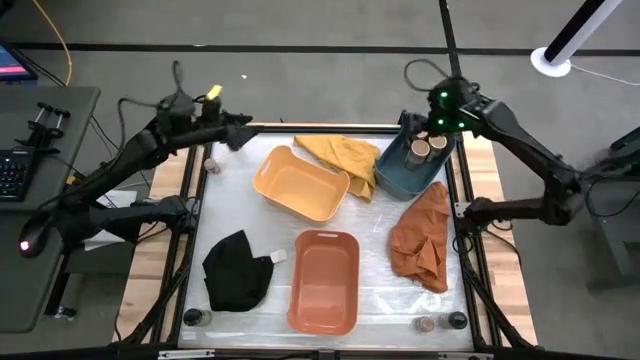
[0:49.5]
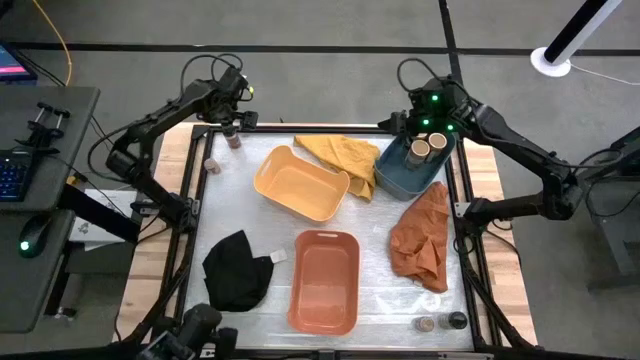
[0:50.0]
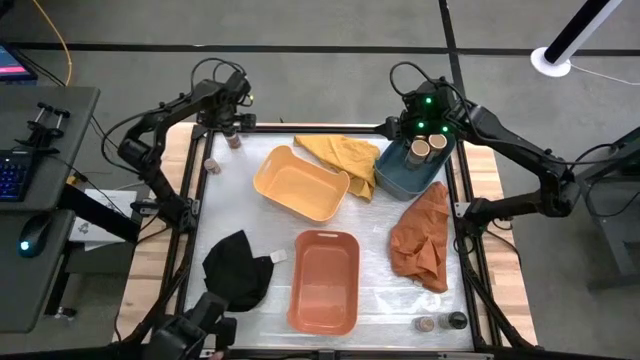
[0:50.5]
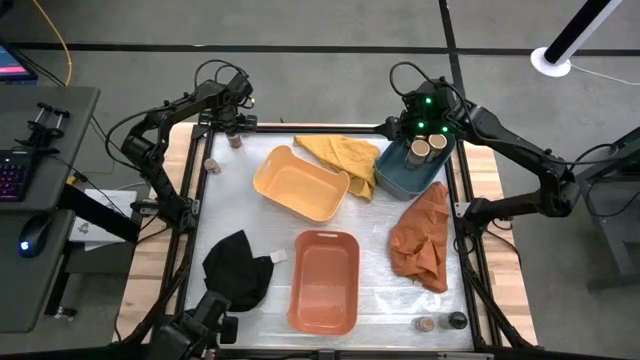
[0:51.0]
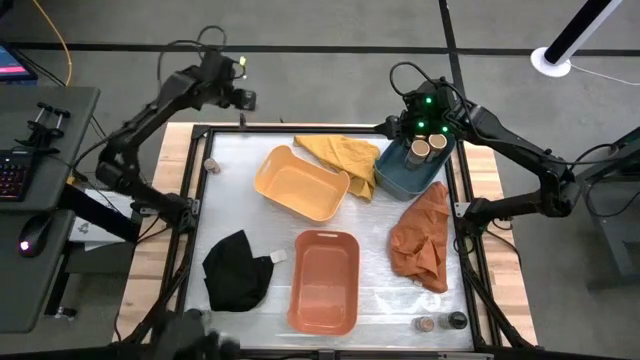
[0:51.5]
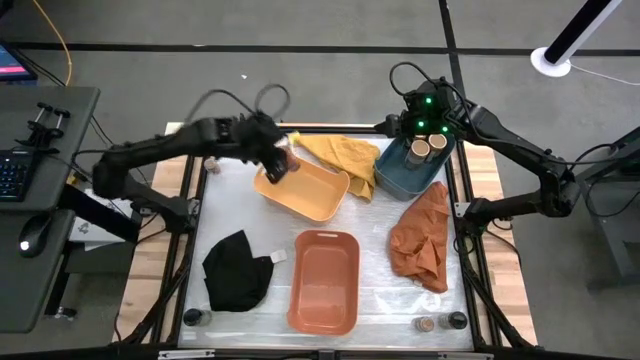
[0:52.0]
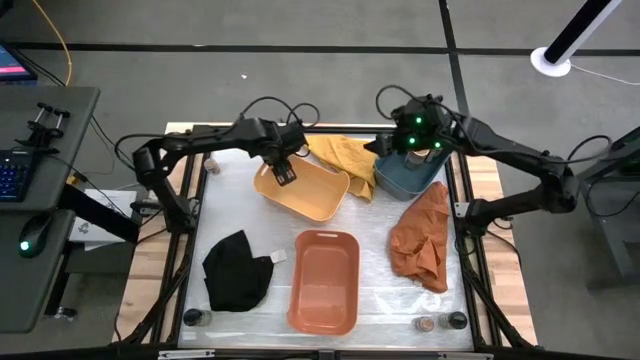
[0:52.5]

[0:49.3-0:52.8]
Task: Sort spices by type
Put the orange seasoning bottle into the yellow bin

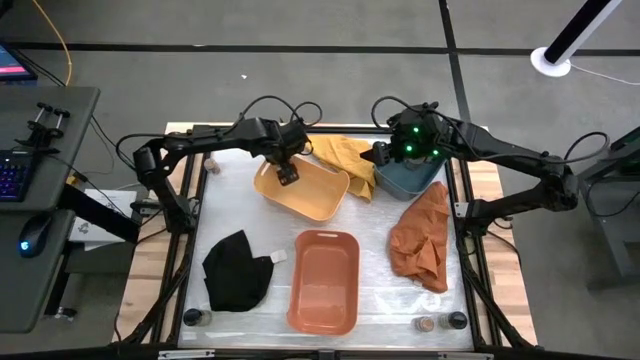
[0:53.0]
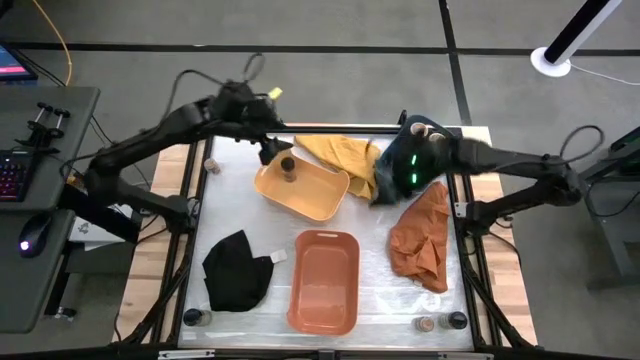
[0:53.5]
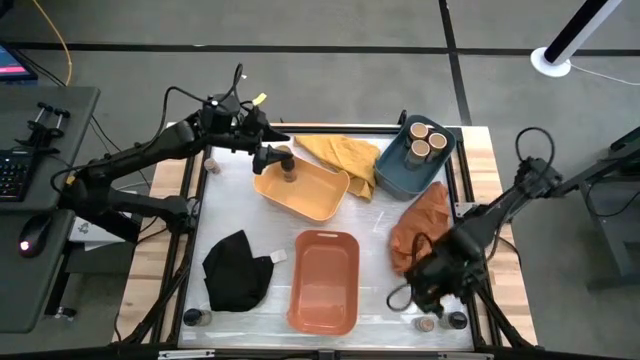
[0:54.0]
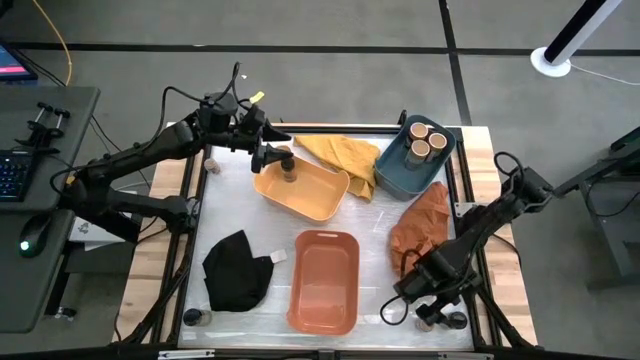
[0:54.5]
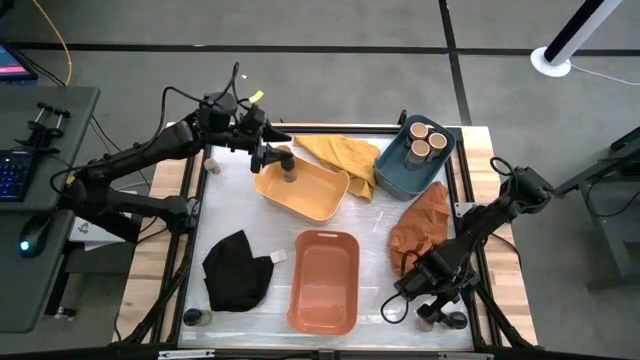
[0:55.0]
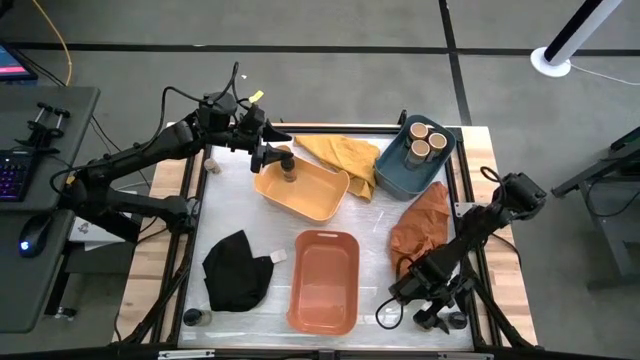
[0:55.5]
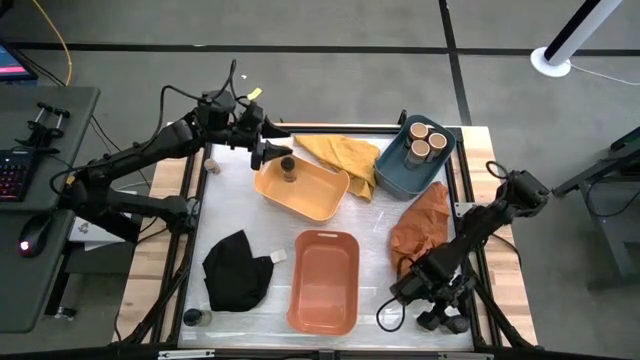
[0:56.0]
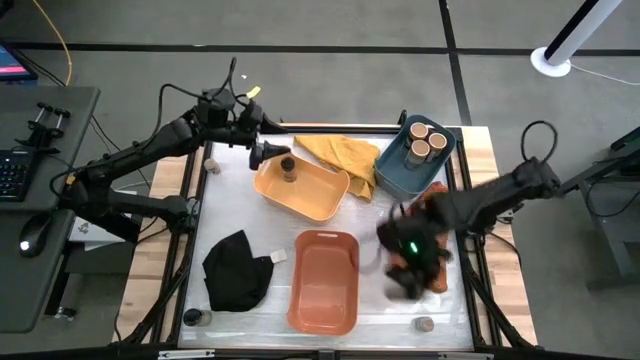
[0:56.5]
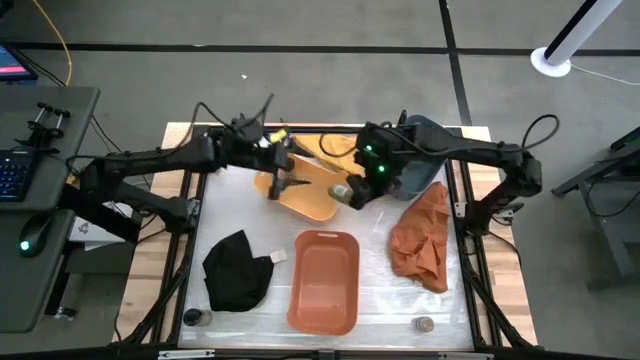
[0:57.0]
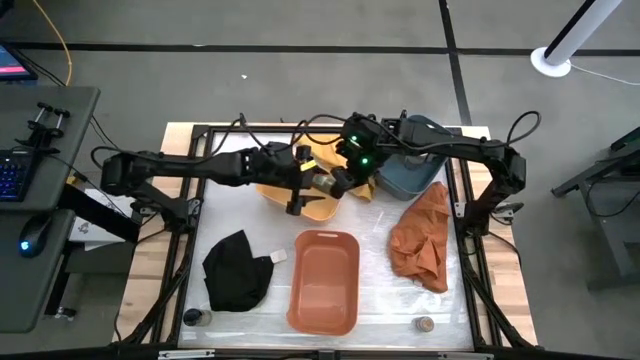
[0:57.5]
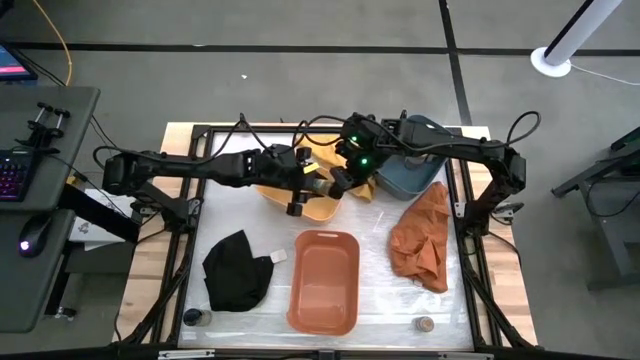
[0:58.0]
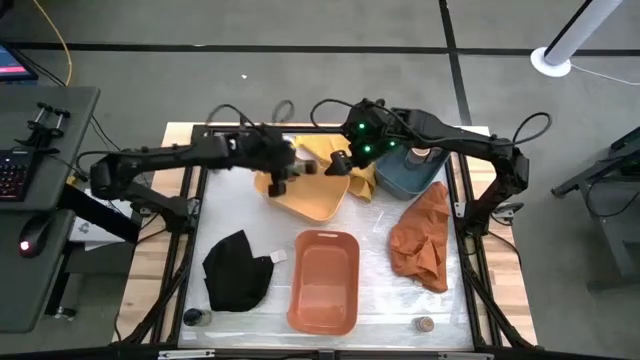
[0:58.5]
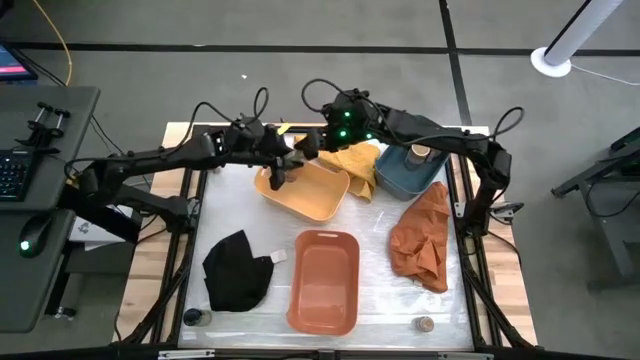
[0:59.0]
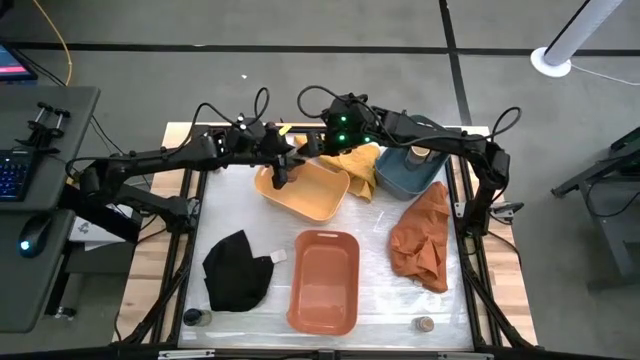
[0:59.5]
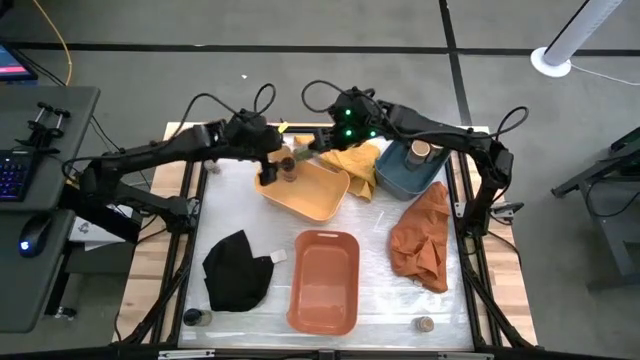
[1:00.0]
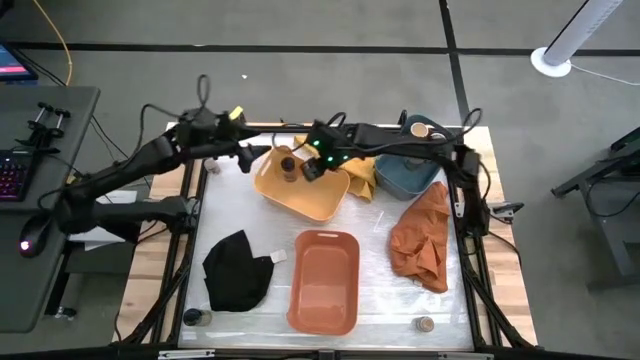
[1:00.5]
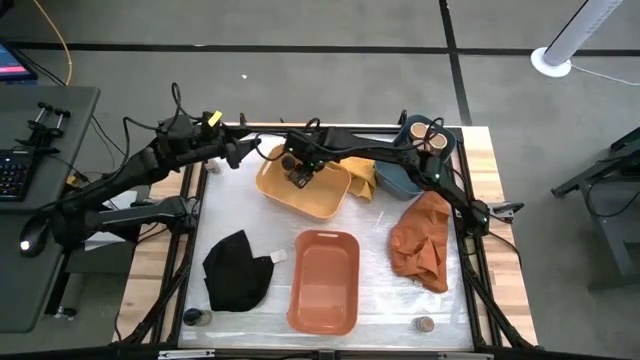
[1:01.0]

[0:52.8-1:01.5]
Put the right green seasoning bottle into the orange bin

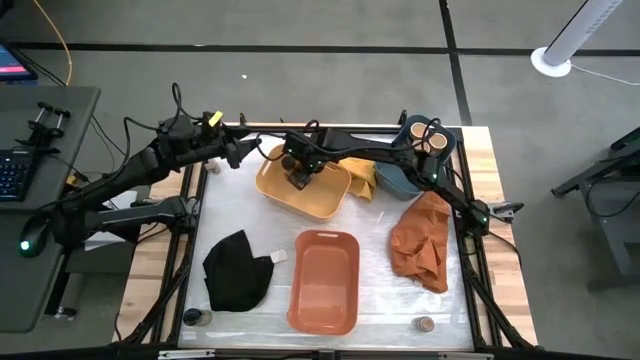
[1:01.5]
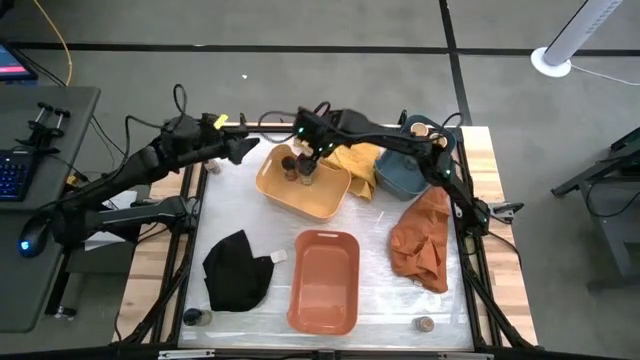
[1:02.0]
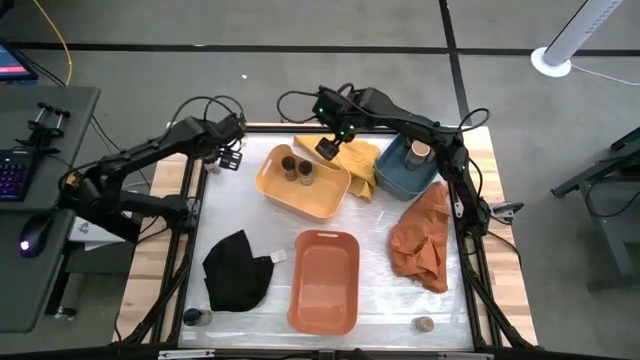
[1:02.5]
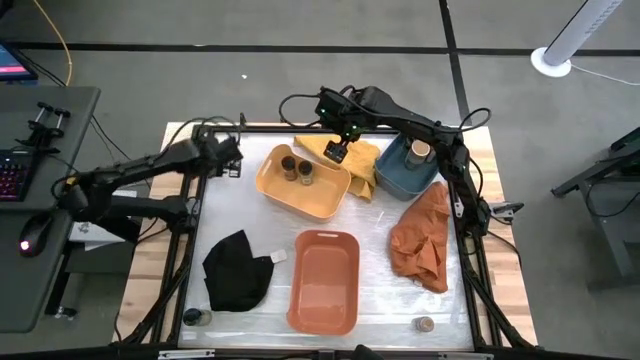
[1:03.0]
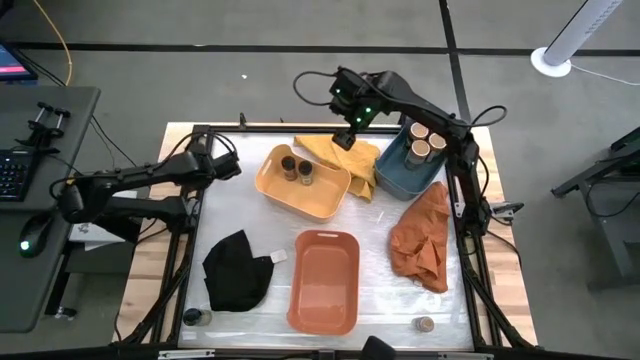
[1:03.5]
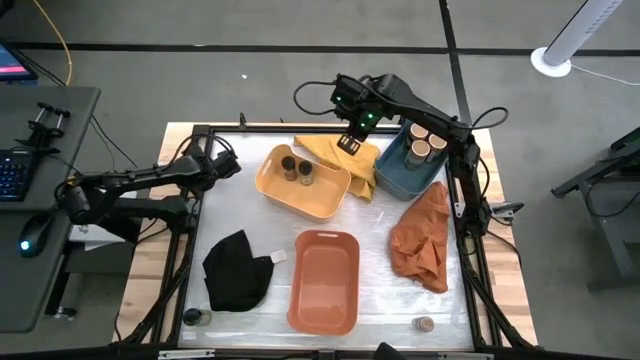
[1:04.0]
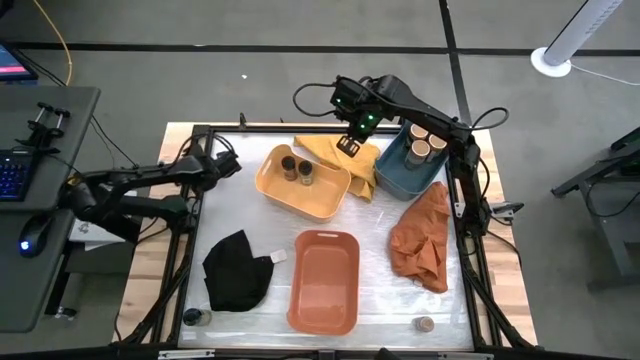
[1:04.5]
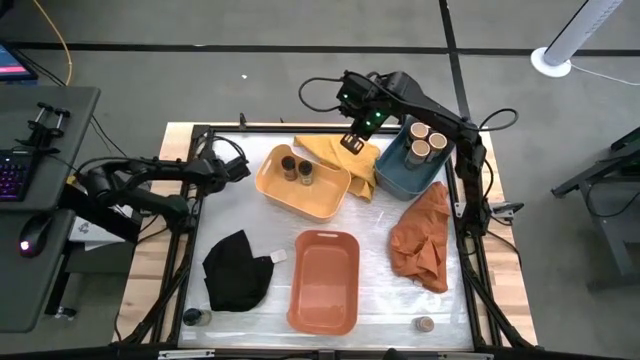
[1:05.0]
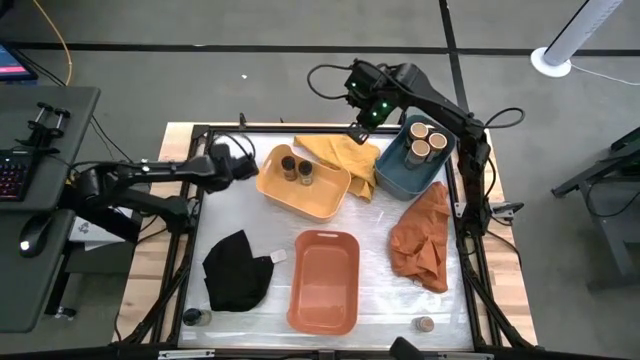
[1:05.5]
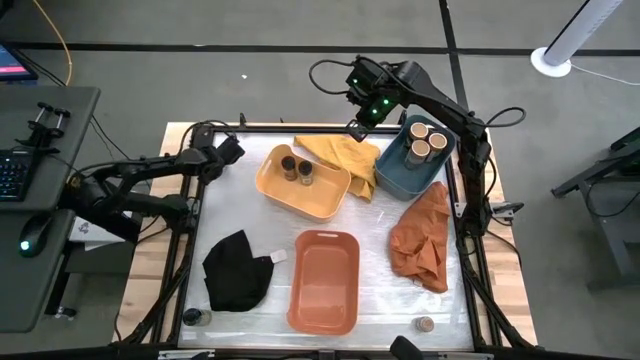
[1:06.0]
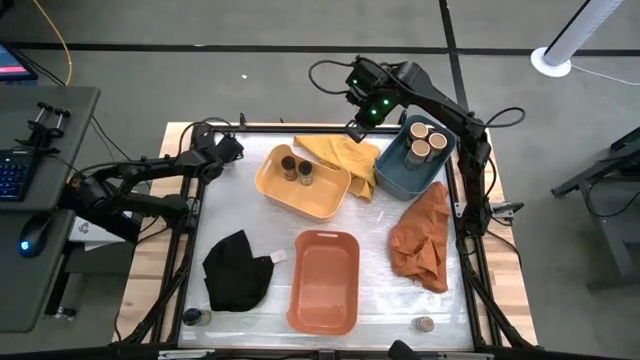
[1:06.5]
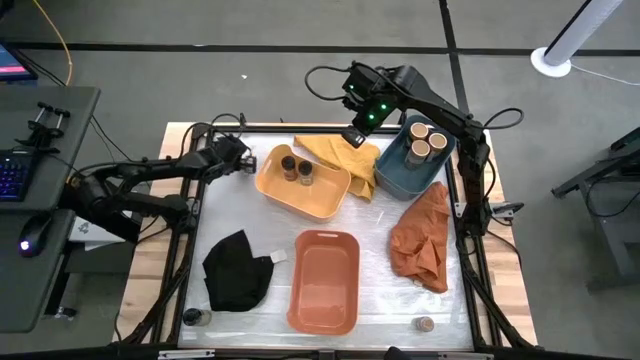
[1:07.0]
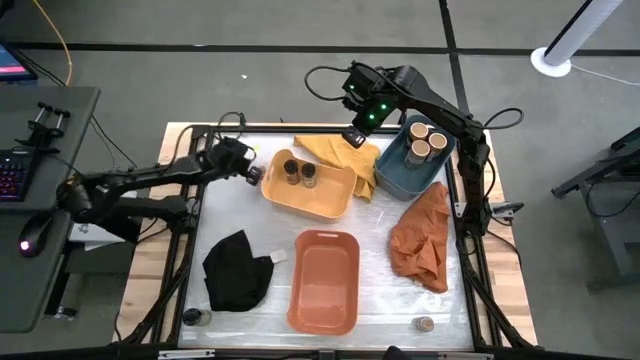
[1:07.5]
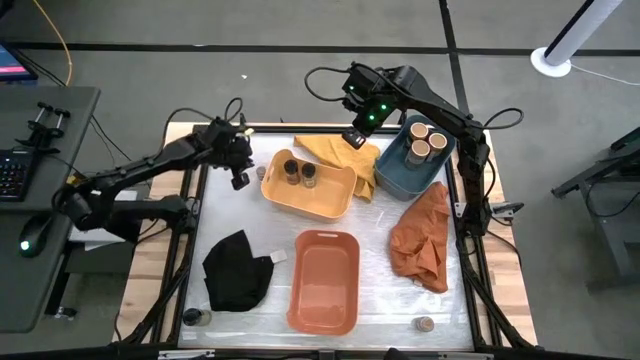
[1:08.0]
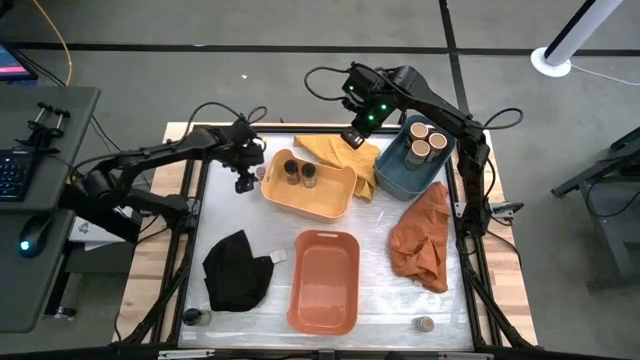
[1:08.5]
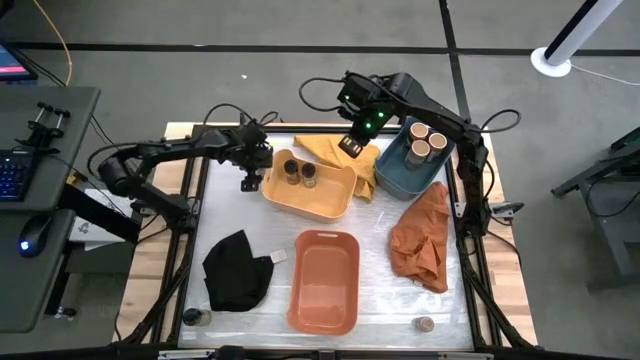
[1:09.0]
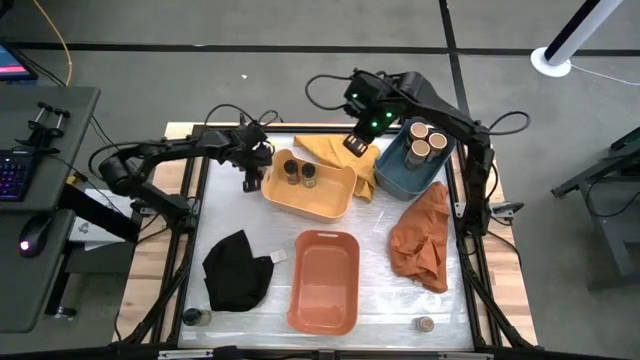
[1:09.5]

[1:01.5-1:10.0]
Put the top brown seasoning bottle into the orange bin
